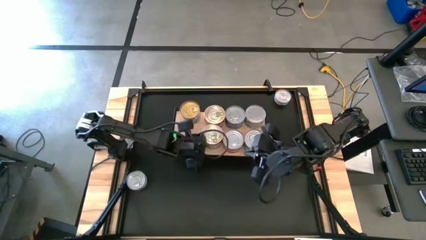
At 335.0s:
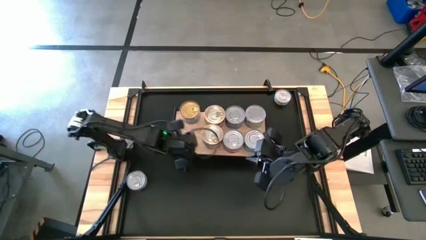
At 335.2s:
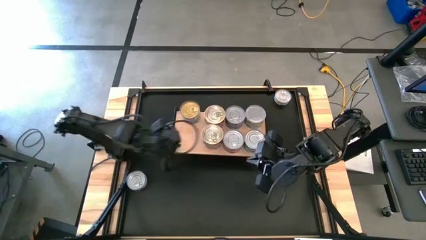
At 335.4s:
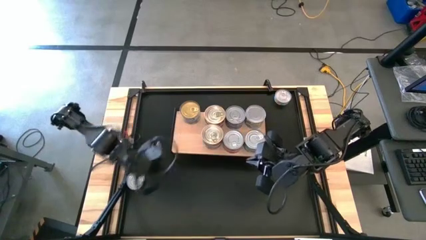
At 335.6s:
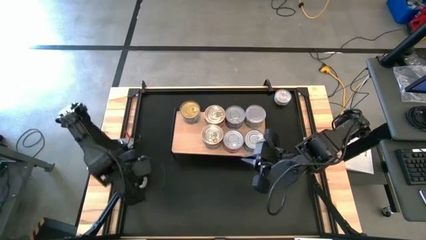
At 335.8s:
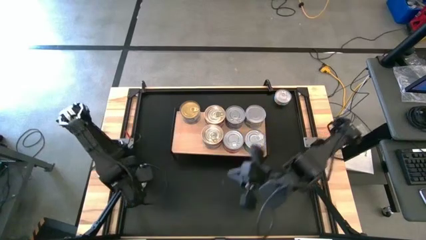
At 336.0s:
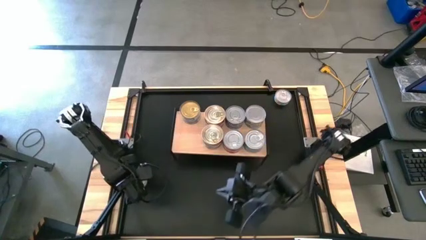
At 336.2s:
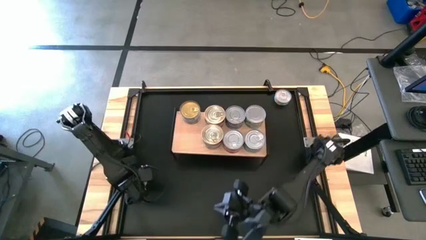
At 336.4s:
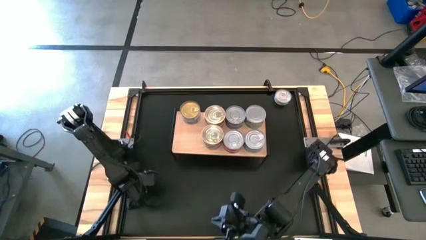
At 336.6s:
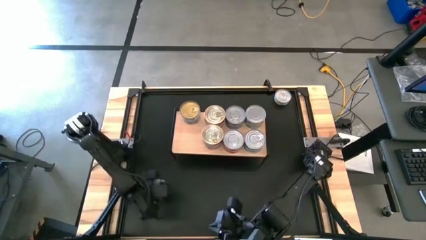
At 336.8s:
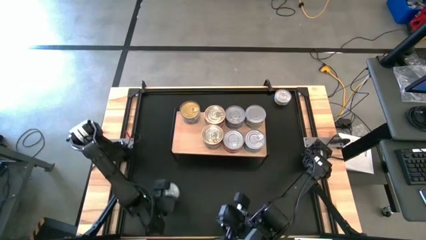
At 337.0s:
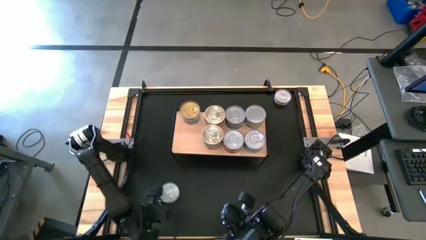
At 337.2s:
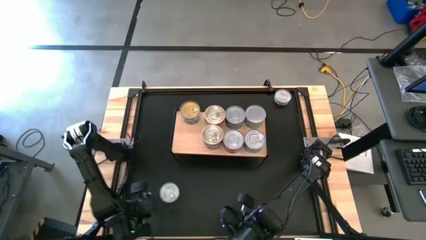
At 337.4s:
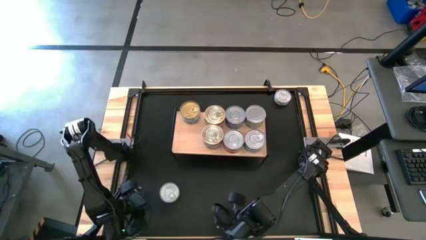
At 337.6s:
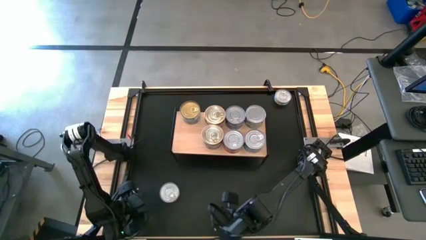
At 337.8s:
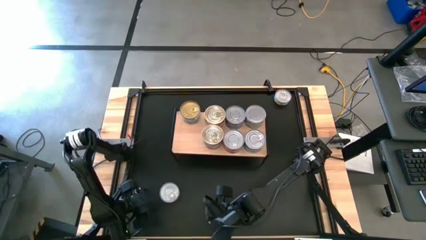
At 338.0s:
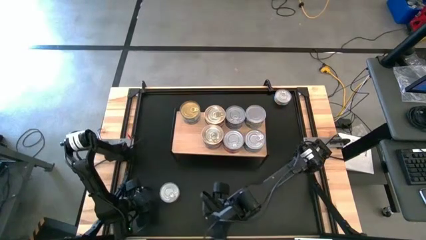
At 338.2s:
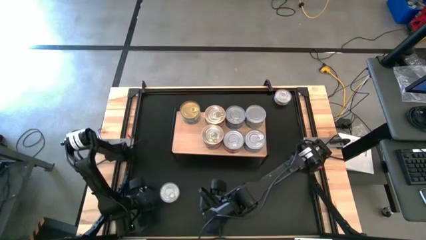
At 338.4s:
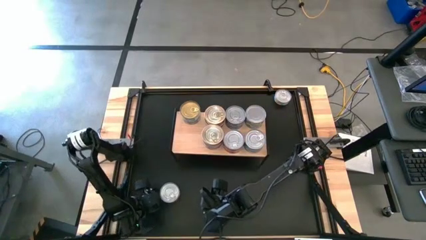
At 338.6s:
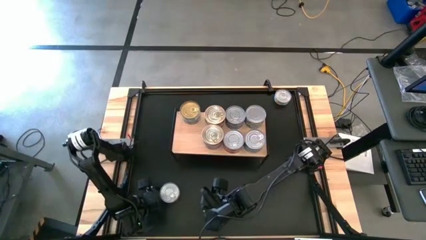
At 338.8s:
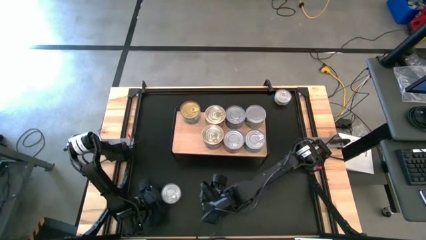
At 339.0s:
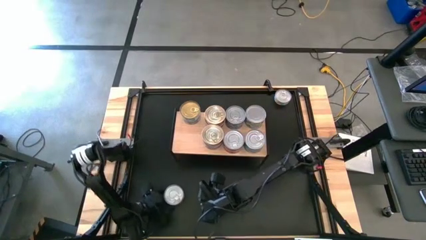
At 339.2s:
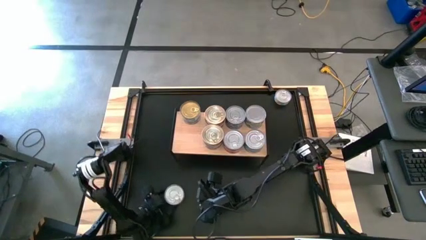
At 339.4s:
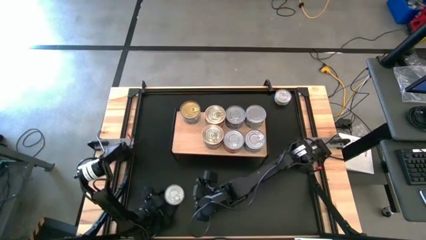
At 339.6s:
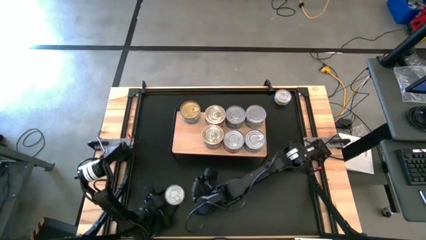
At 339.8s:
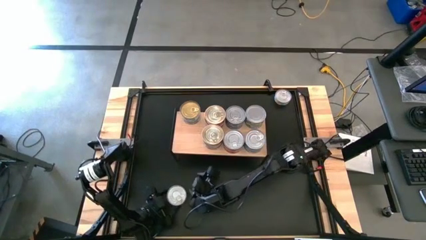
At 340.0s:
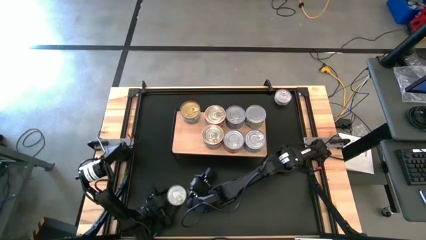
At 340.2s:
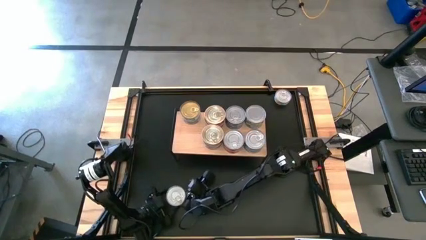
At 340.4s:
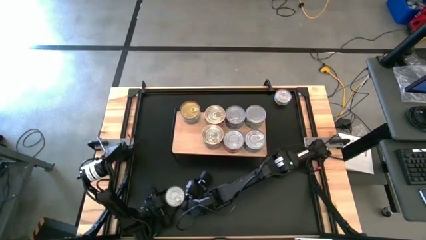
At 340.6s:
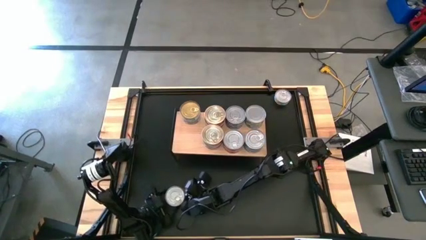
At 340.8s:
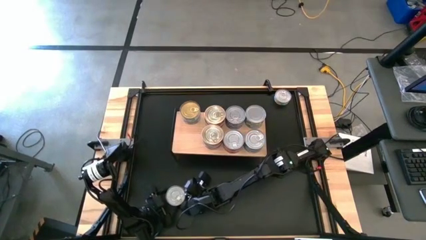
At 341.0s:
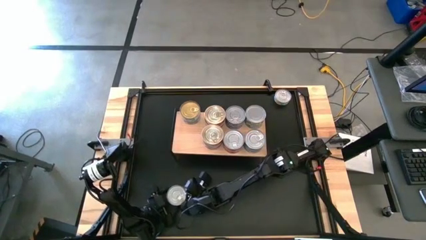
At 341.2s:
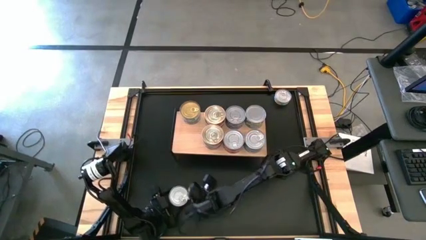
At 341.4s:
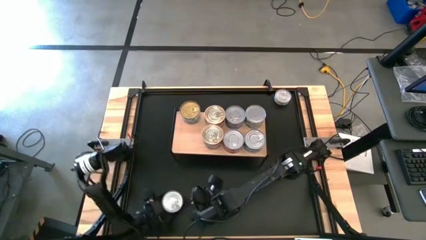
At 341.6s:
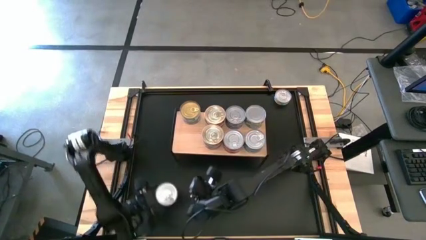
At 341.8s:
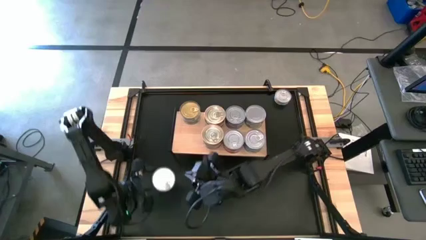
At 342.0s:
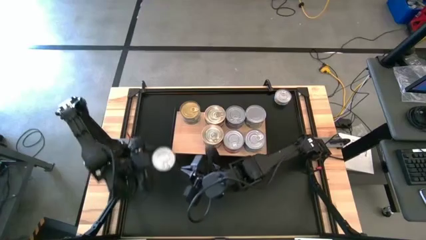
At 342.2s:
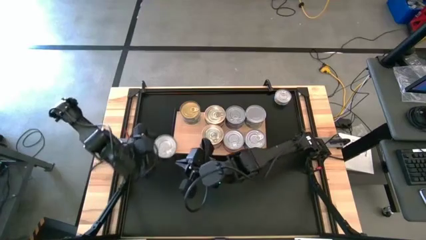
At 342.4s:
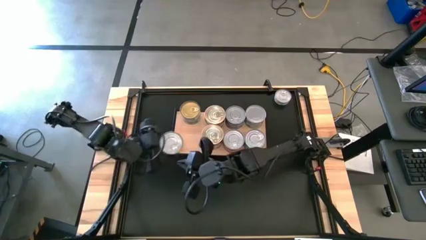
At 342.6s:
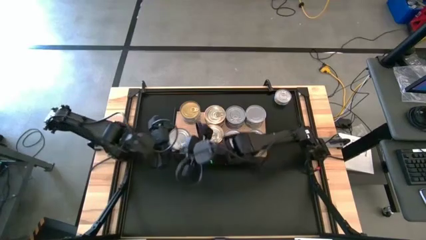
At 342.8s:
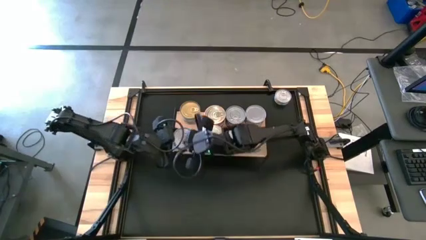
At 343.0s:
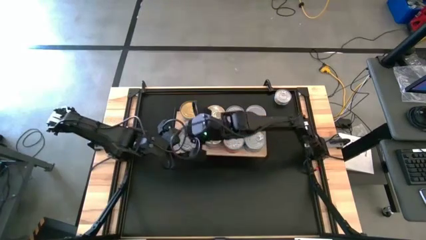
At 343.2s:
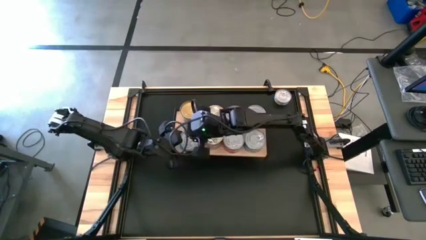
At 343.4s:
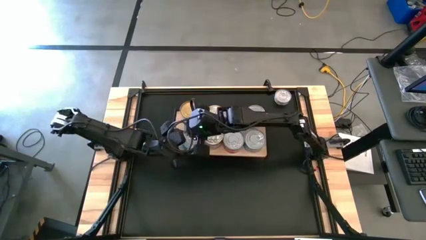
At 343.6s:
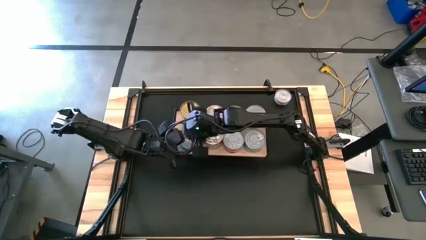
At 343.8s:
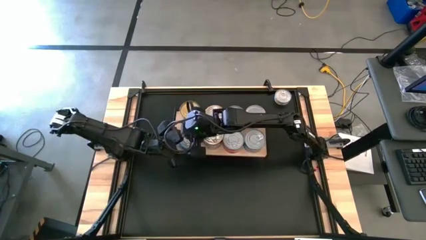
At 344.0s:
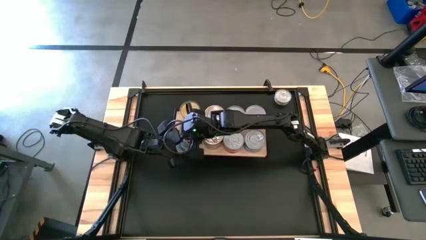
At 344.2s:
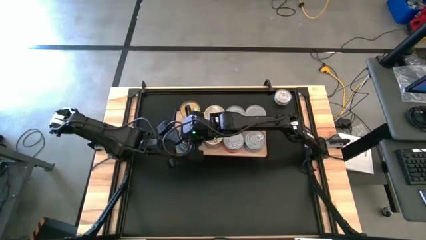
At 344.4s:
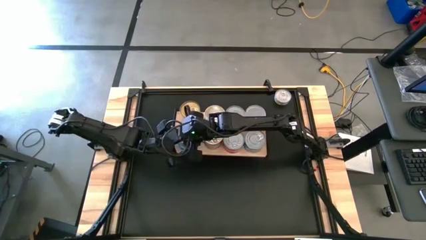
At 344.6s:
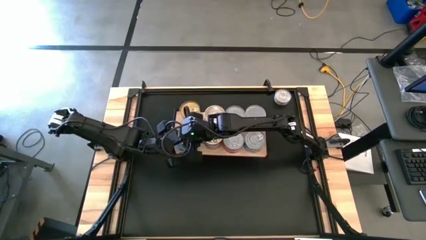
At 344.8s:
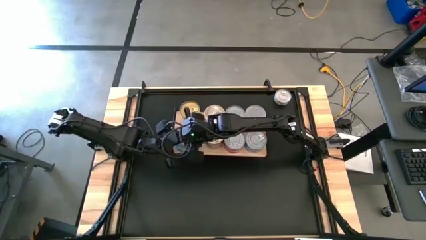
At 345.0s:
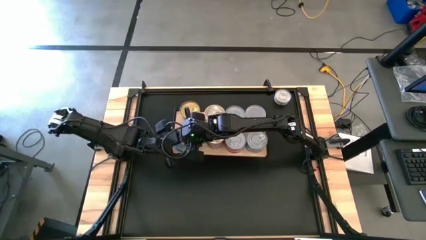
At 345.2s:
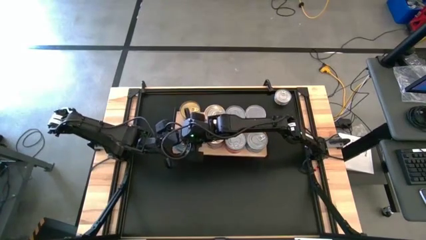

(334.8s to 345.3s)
Task: Stack canned seafood by type on shelf
Put the yellow blue tuna can on the shelf

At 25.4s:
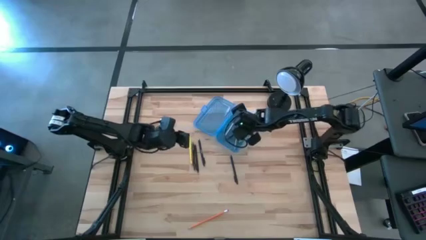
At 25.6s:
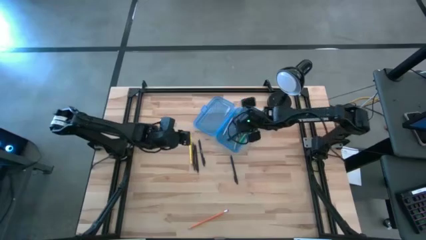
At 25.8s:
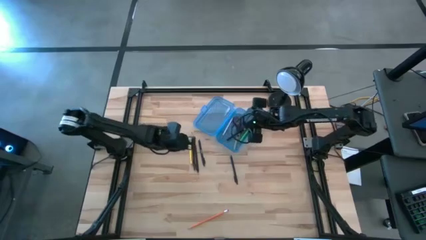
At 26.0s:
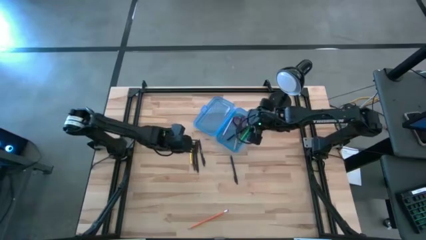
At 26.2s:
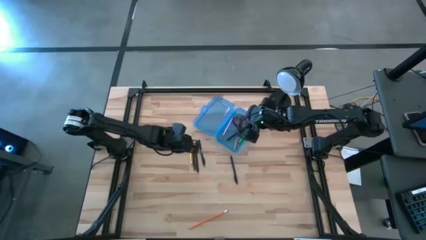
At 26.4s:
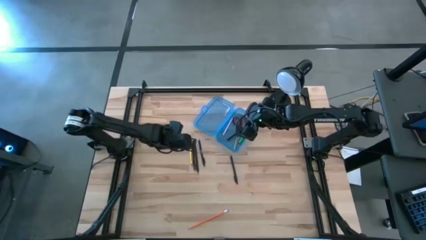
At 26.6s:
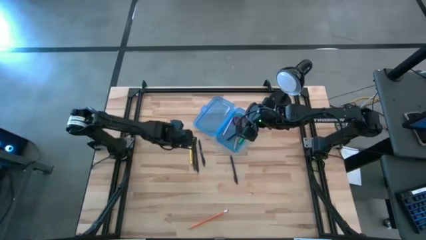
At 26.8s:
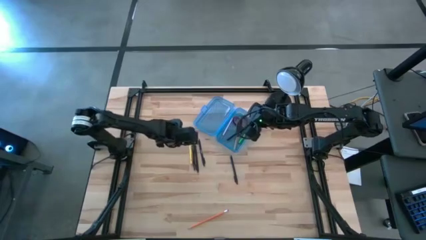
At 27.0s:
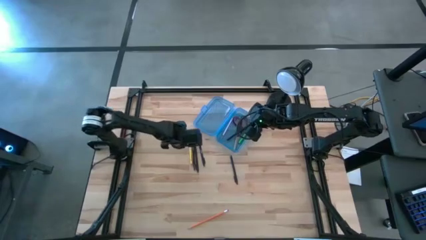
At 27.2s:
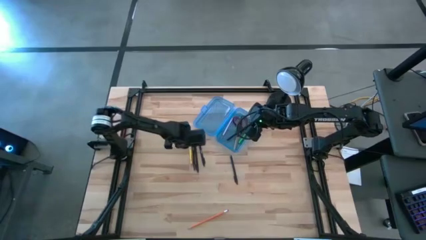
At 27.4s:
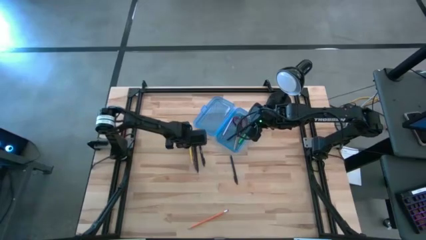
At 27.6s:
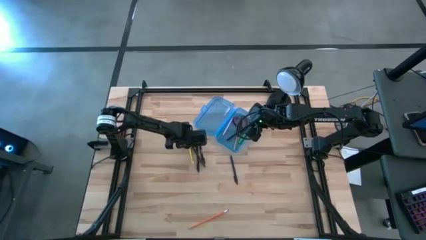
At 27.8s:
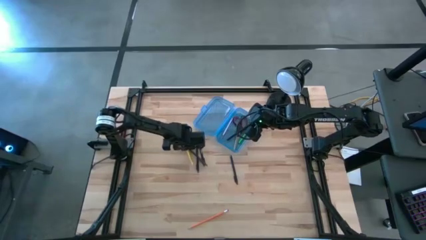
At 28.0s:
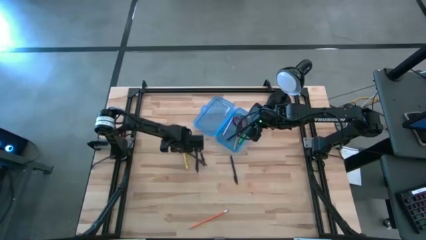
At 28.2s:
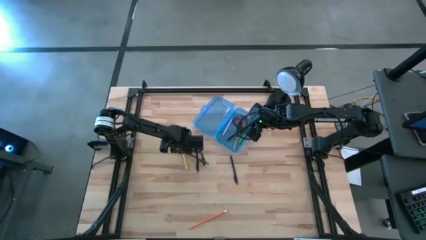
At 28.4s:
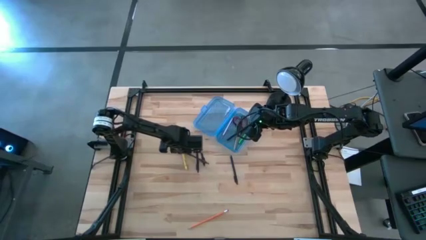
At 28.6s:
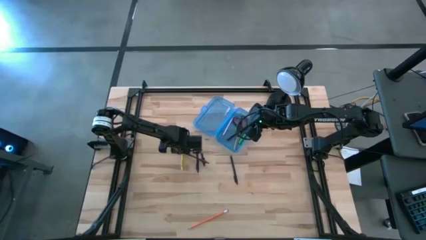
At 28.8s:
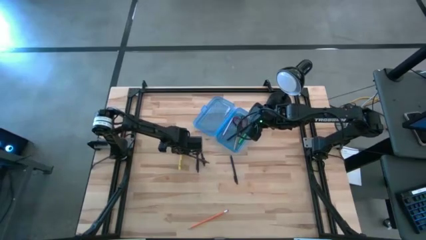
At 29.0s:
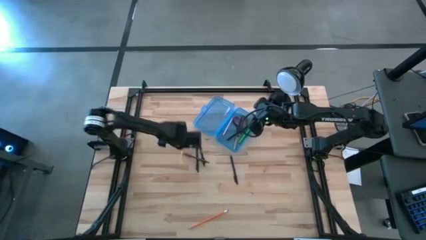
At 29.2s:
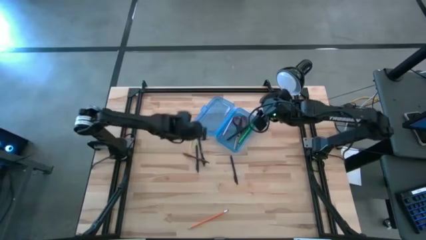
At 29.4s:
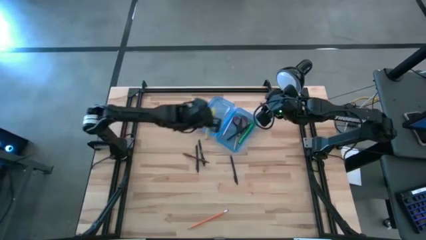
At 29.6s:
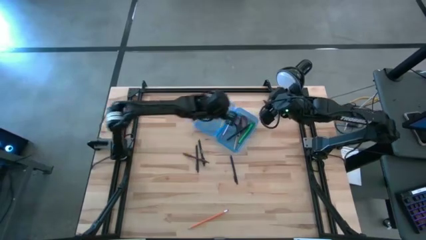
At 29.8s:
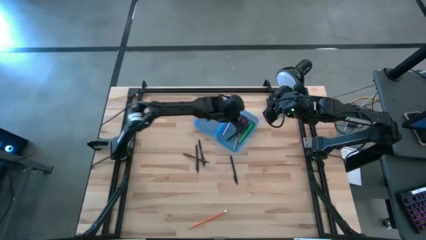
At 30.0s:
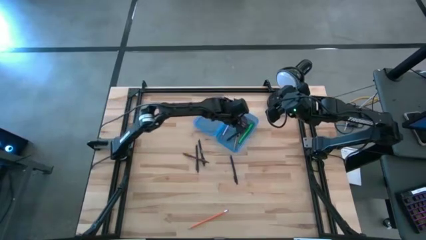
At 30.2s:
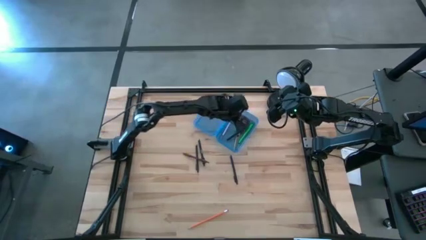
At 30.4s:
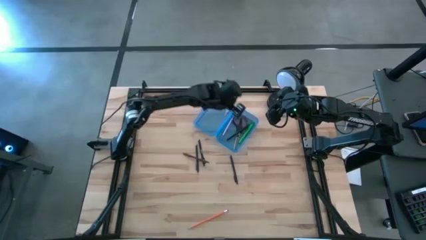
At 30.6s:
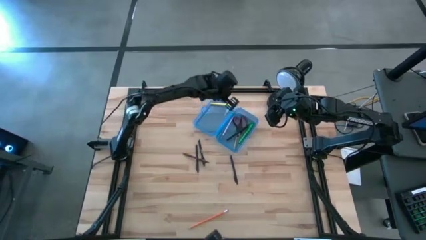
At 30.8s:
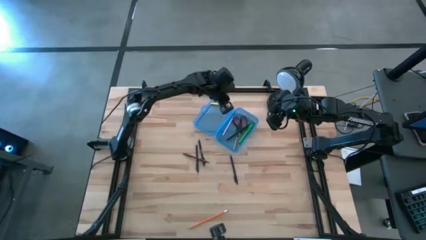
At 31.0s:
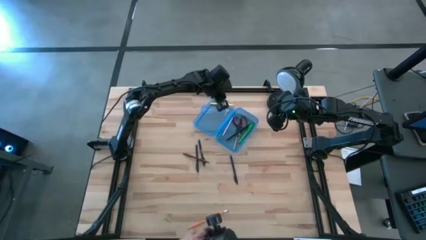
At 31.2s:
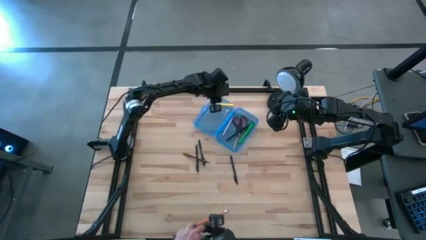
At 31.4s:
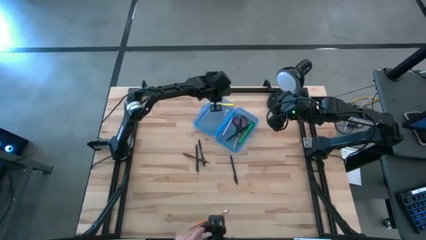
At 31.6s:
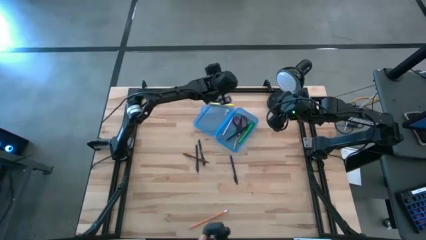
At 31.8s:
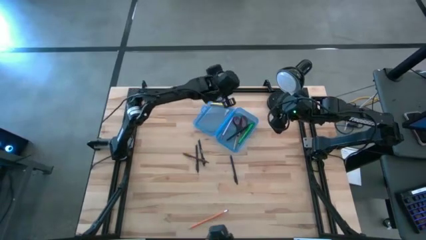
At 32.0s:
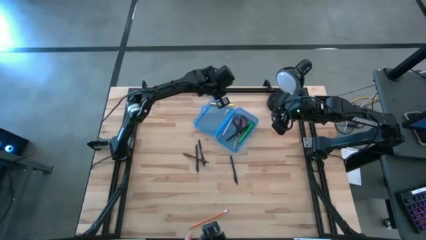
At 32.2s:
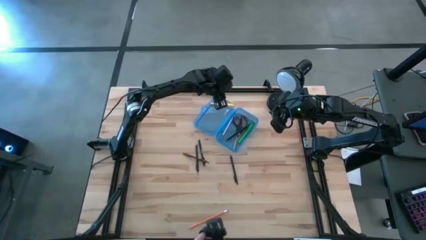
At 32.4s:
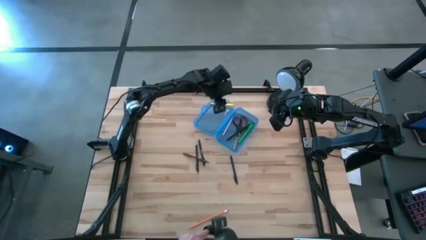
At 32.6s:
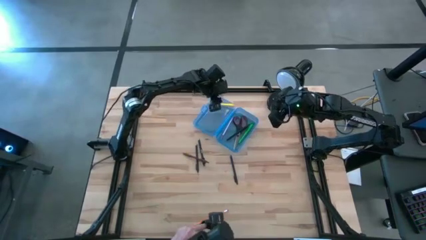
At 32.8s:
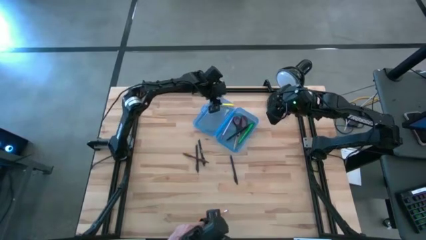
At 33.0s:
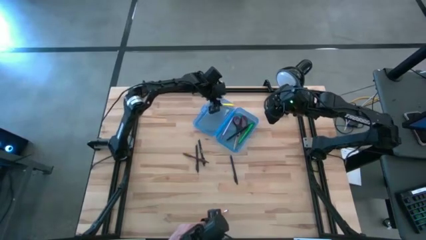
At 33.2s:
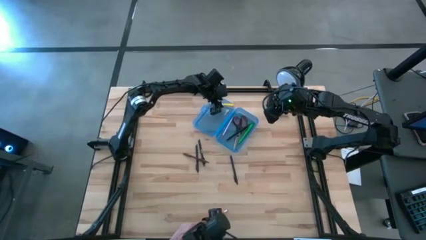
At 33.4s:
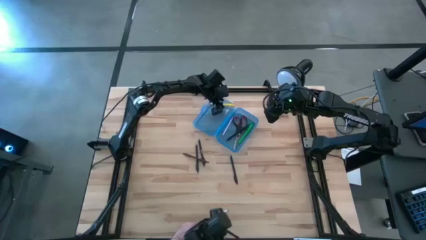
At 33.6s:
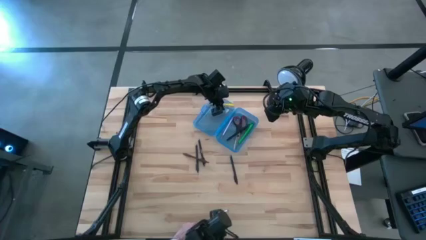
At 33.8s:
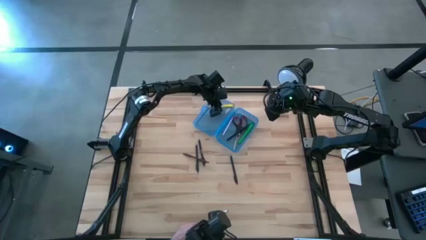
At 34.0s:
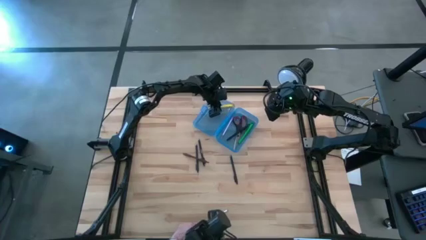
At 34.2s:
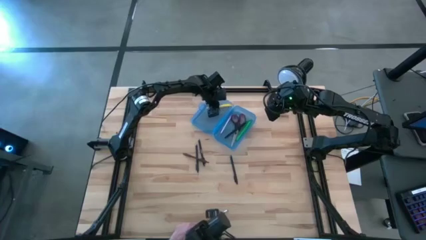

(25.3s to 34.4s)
Task: Pick & place school supplies into a supply box
Put the yellow pen into the blue supply box
